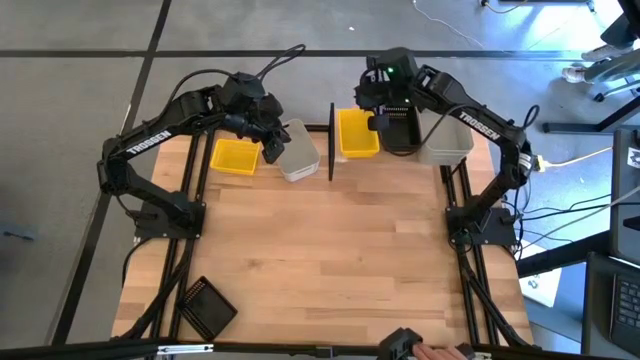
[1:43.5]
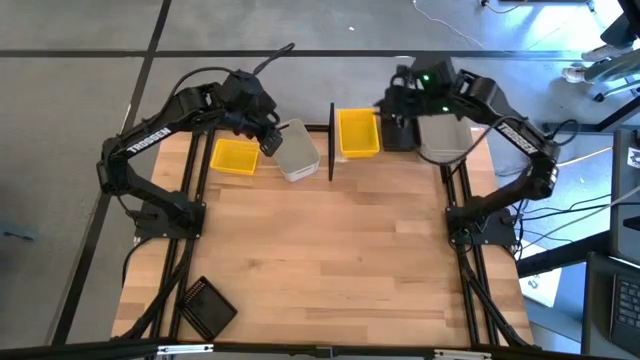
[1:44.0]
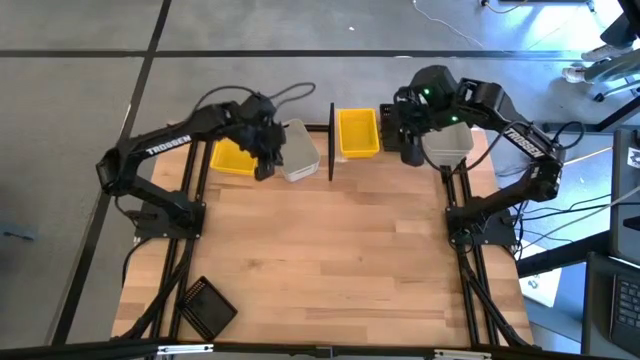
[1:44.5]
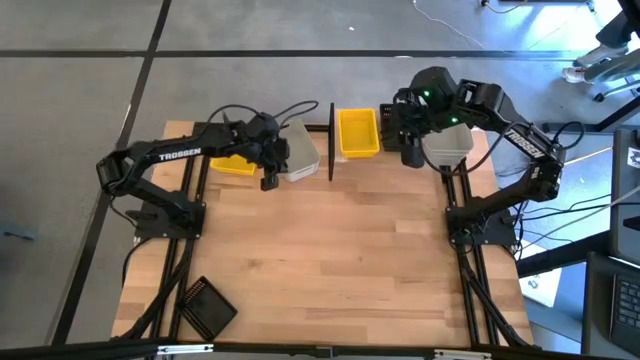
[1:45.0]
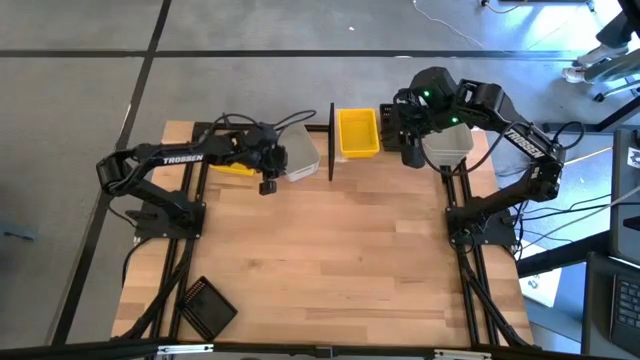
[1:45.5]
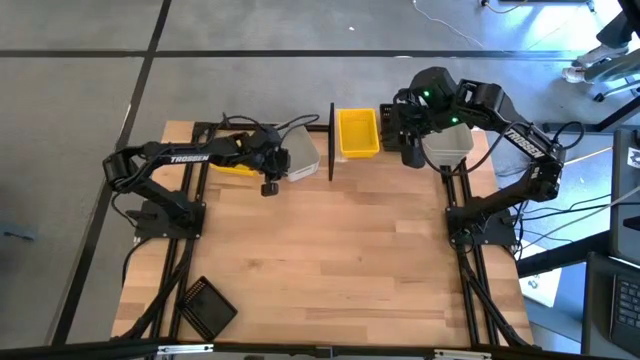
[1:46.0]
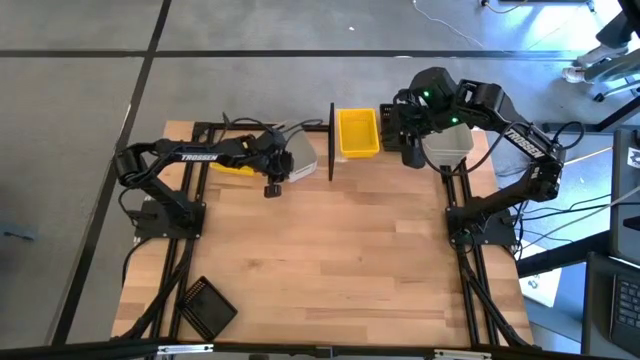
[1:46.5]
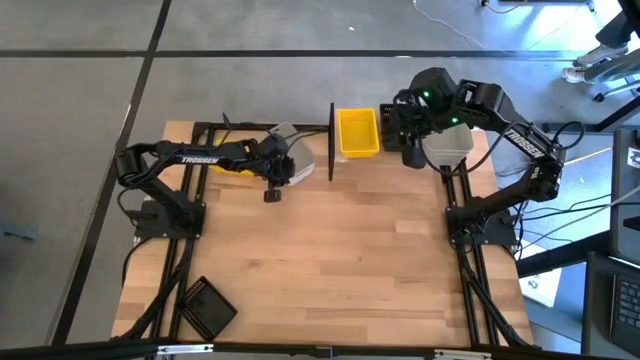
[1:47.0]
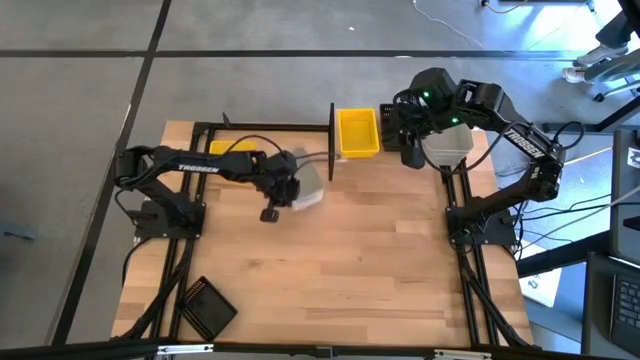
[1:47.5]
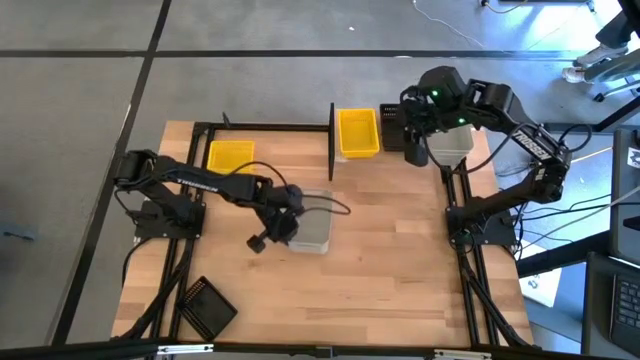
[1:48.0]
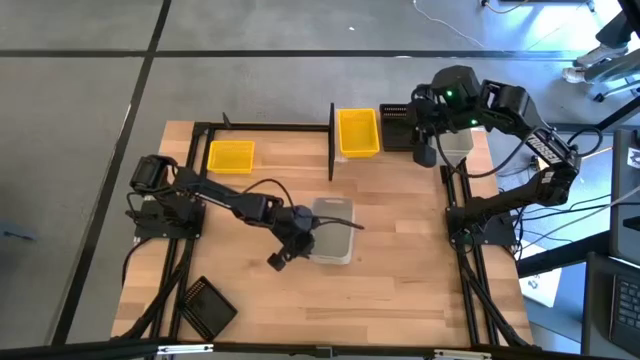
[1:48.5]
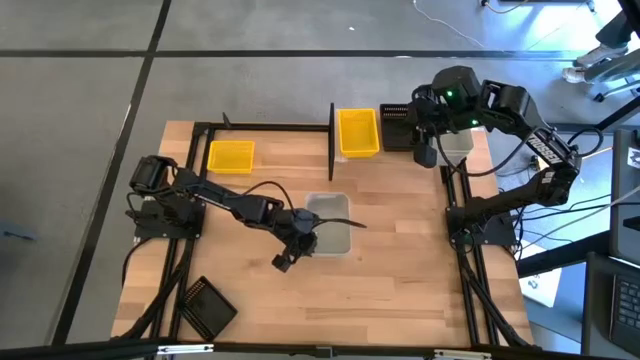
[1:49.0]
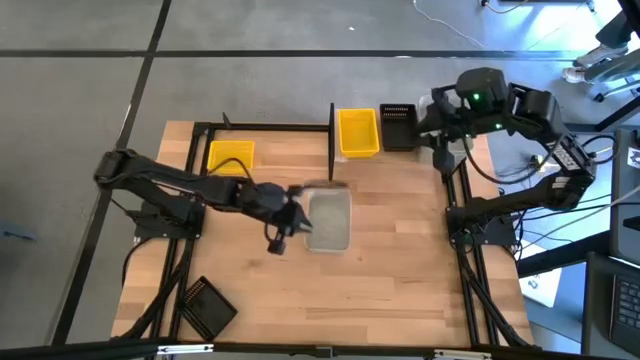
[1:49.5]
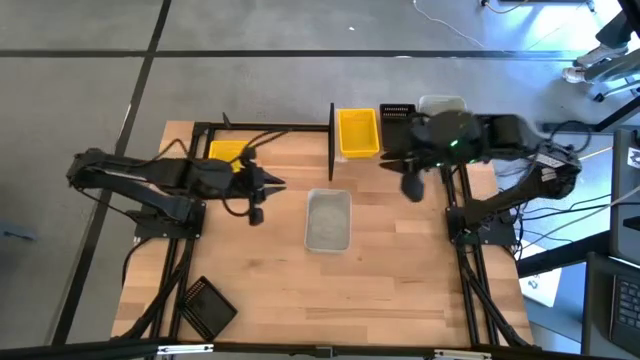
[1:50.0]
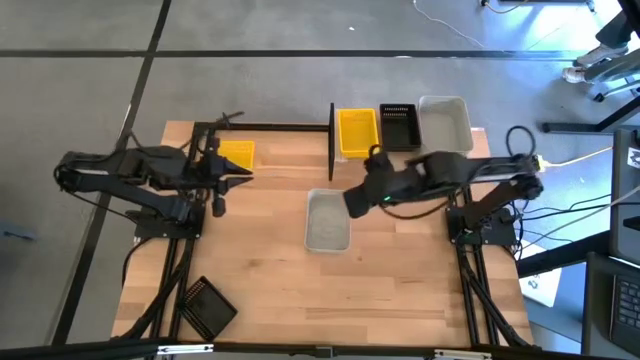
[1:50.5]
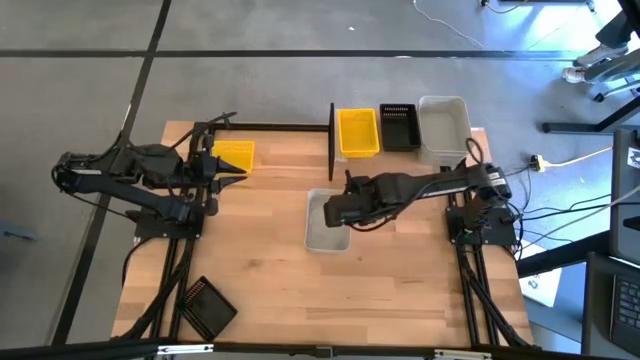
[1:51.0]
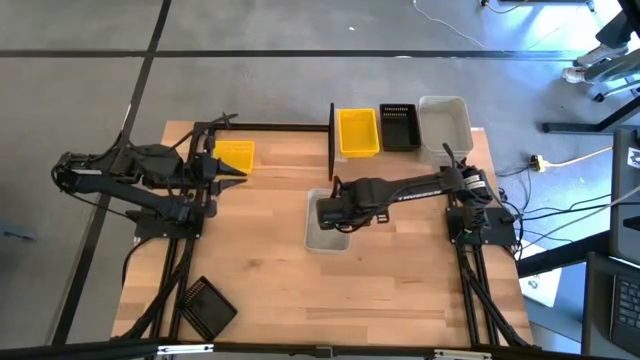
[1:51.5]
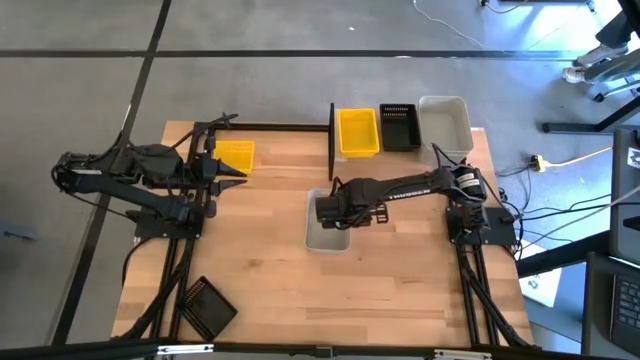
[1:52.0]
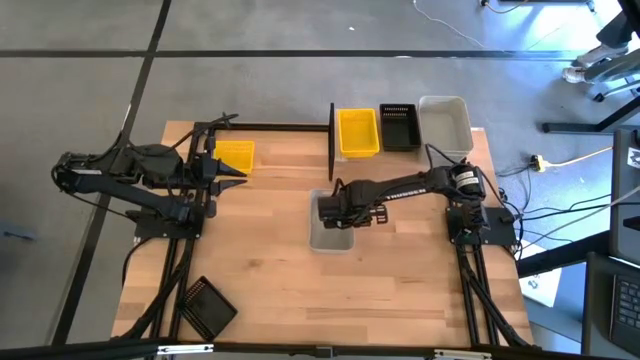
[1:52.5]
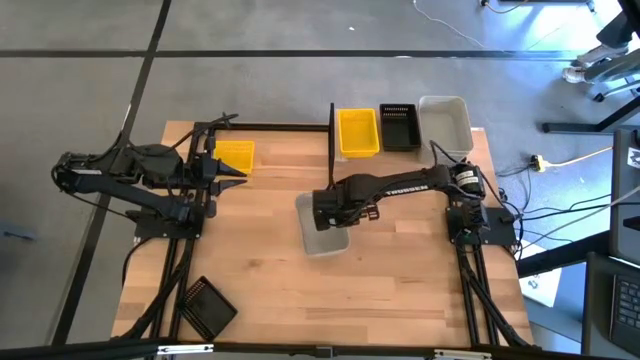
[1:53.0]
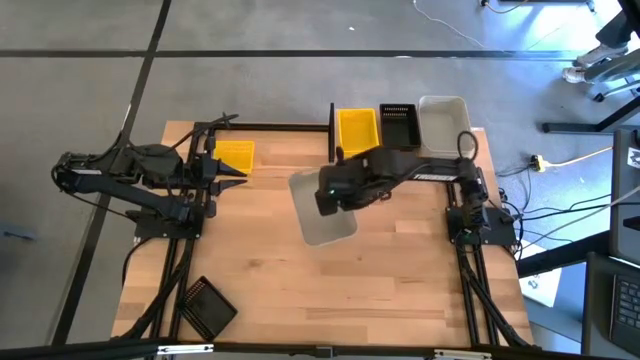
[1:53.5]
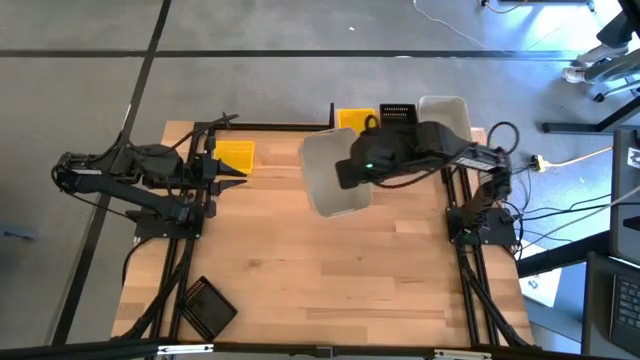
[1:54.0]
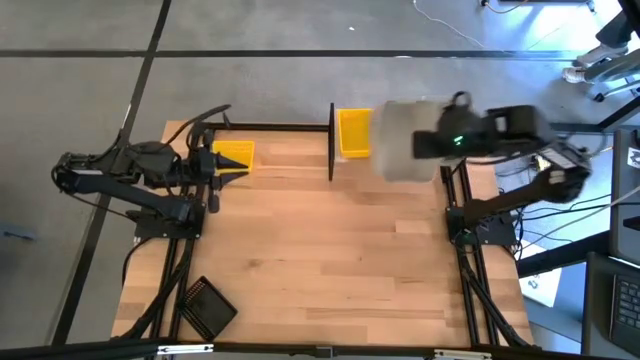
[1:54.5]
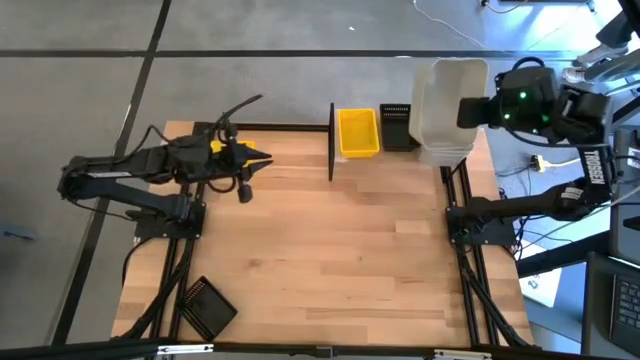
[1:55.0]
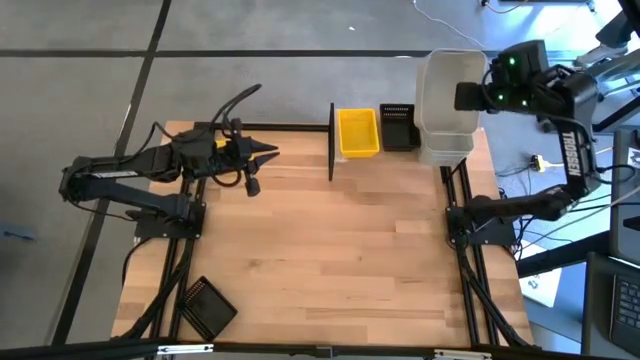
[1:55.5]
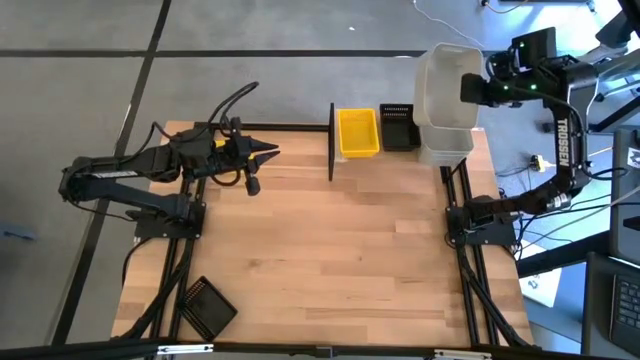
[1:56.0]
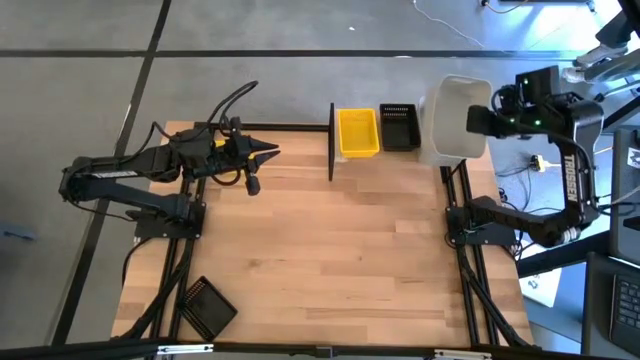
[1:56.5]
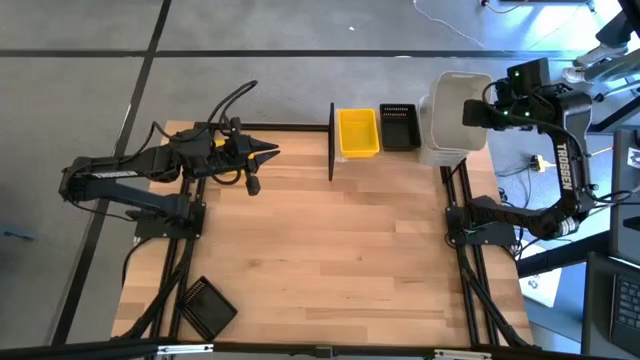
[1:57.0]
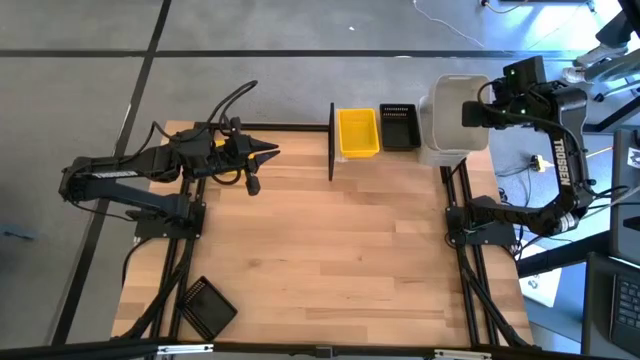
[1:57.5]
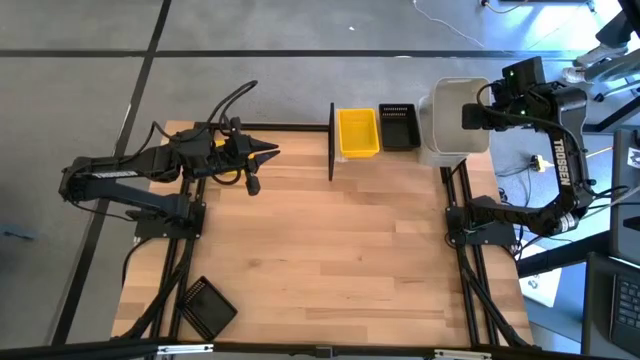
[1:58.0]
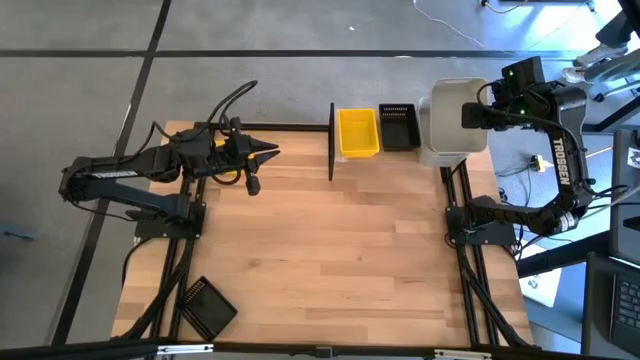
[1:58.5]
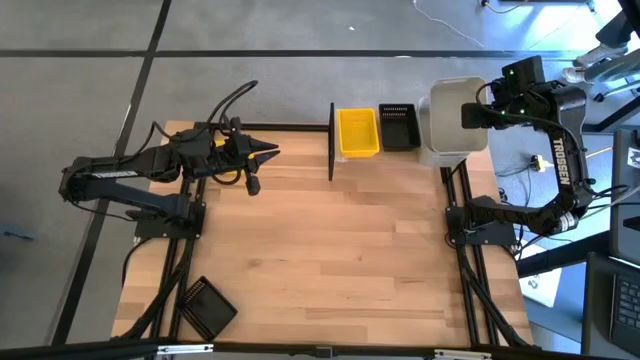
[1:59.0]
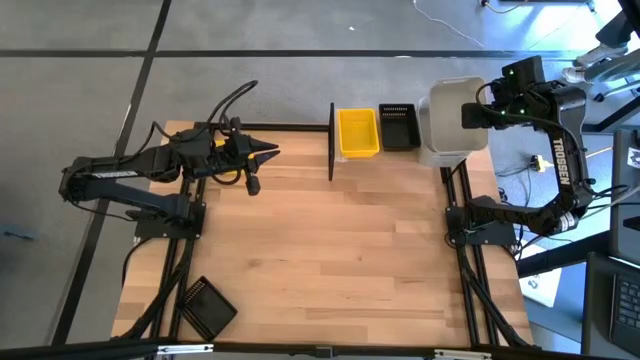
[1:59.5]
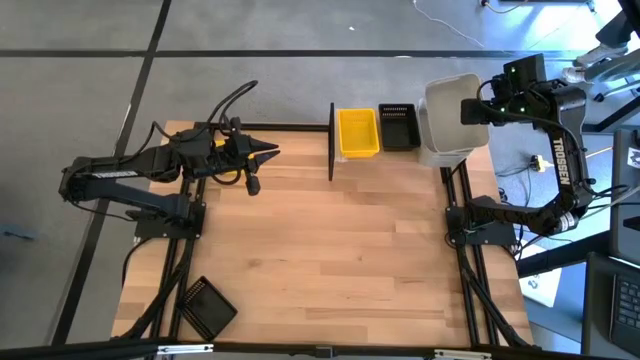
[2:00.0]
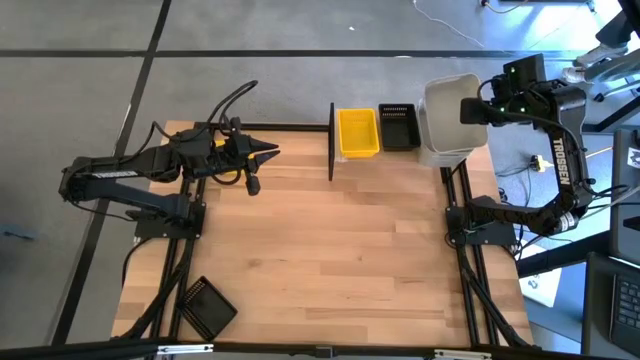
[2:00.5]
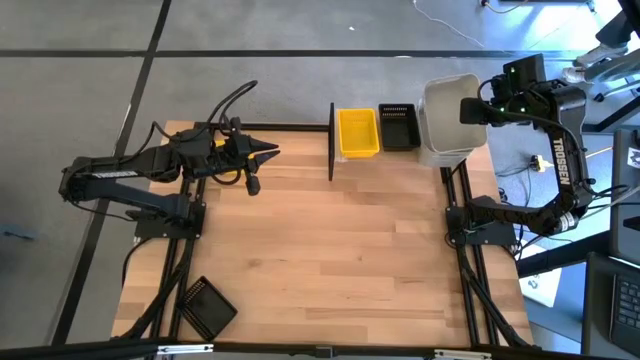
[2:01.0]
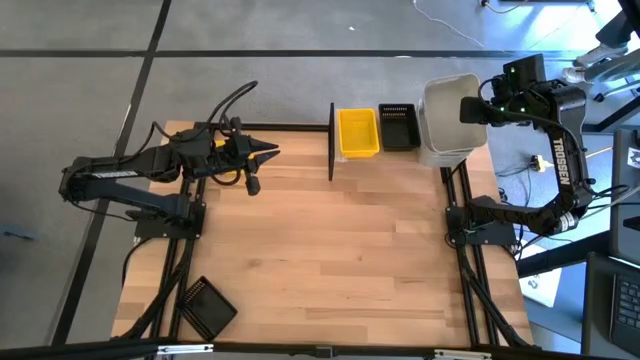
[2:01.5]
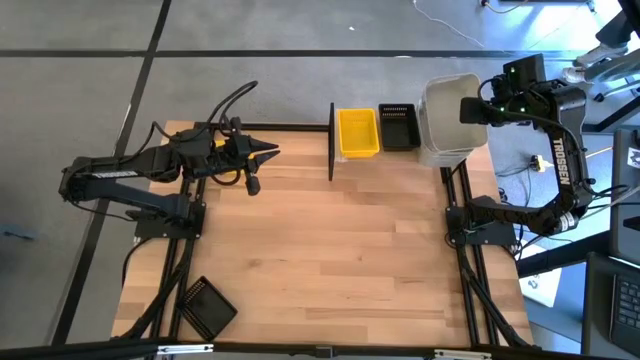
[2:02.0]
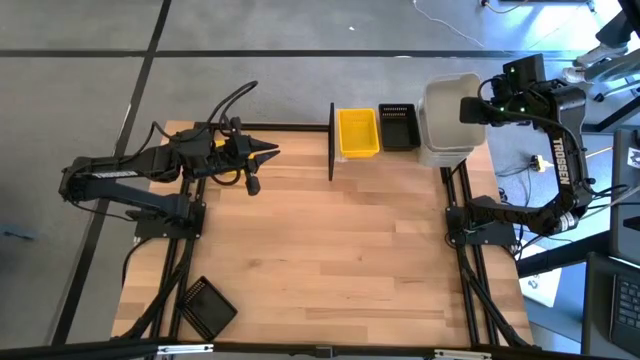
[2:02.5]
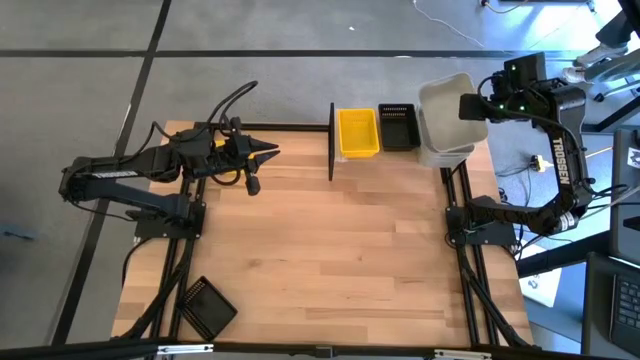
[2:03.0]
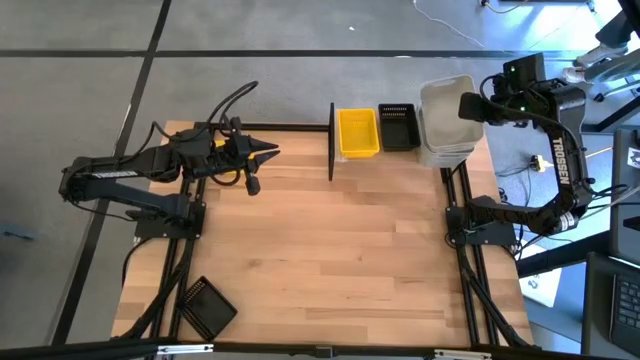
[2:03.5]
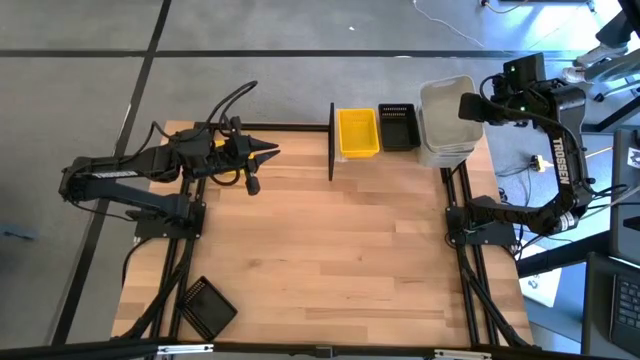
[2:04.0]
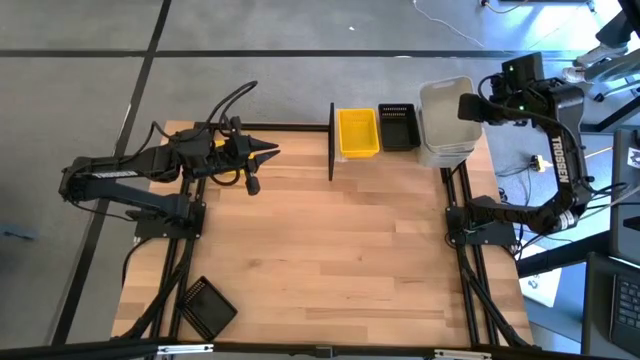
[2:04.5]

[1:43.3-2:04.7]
Task: Stack baskets on shelf by color
Stack the white bin on top of the white bin on the shelf

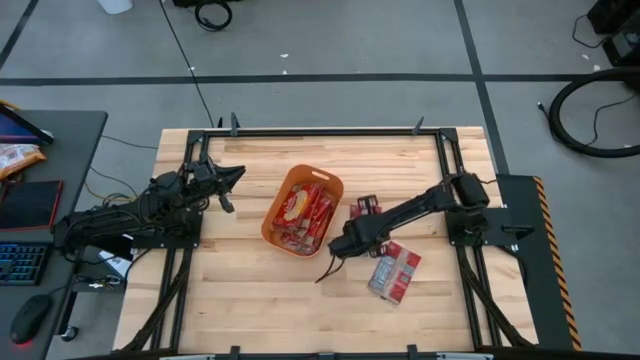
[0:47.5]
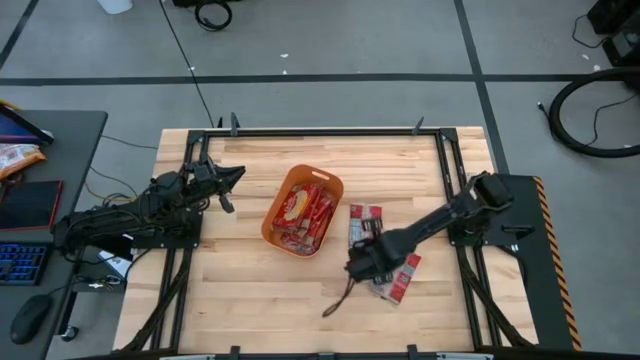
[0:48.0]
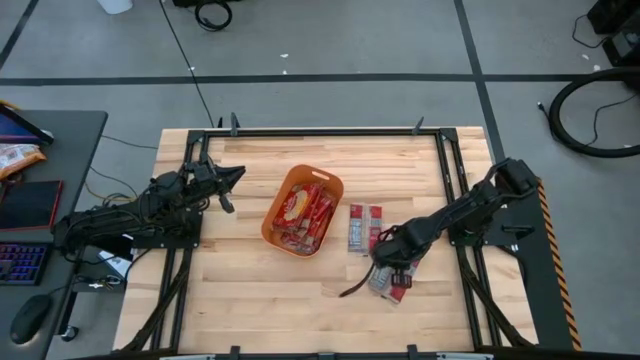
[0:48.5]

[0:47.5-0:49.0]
Task: Sort popcorn bags into baskets
Move the red popcorn bag to the middle of the table
